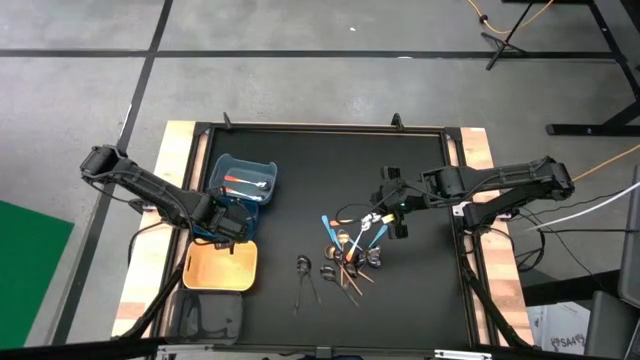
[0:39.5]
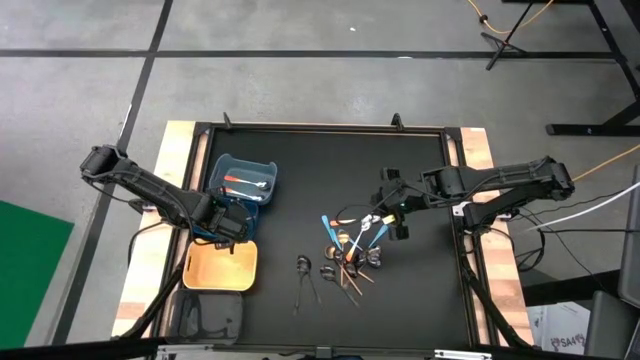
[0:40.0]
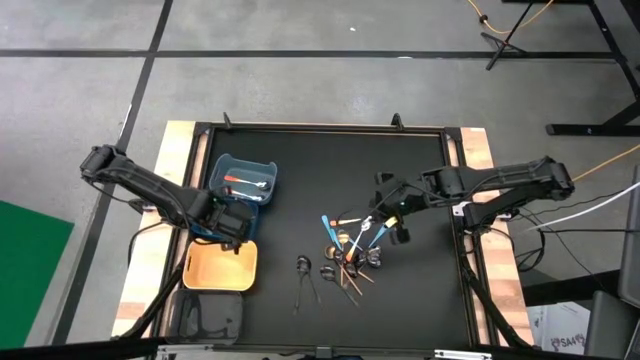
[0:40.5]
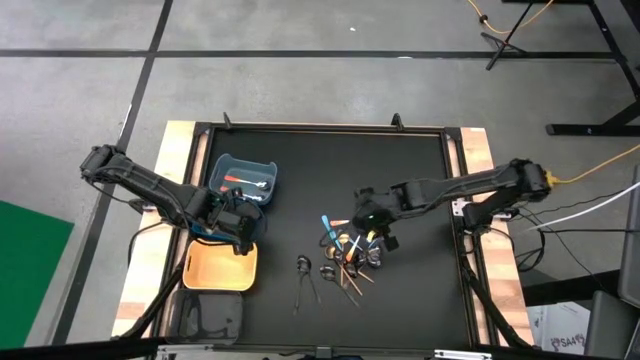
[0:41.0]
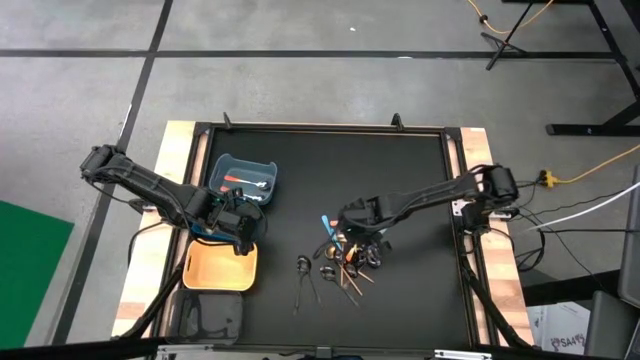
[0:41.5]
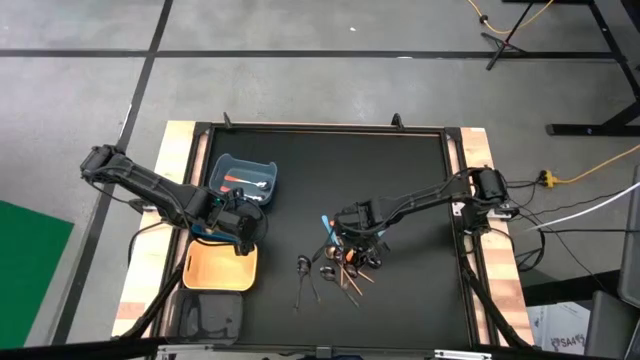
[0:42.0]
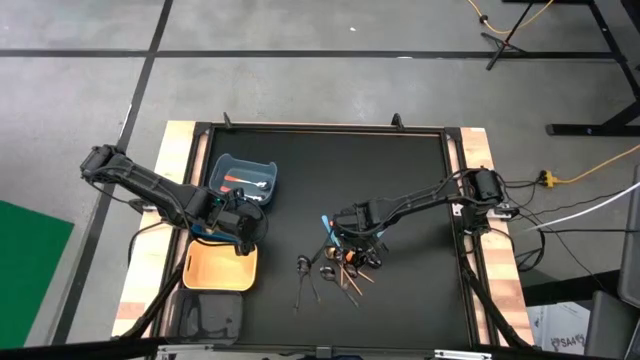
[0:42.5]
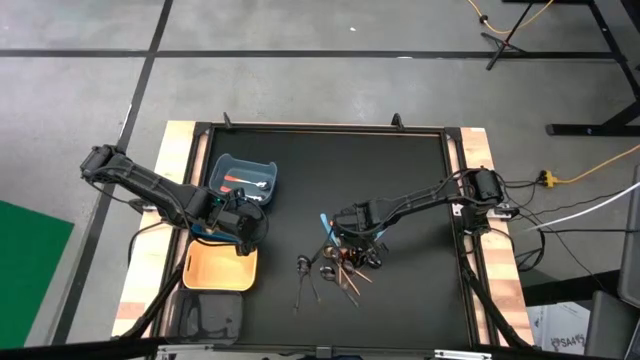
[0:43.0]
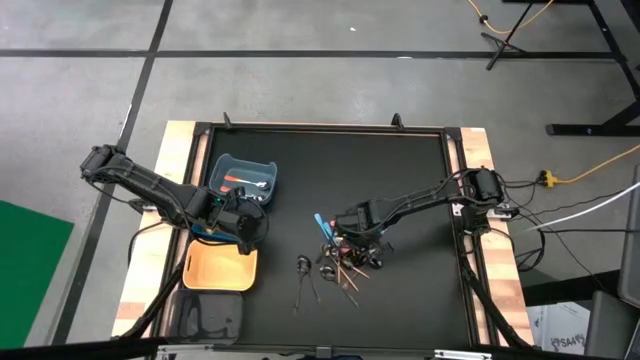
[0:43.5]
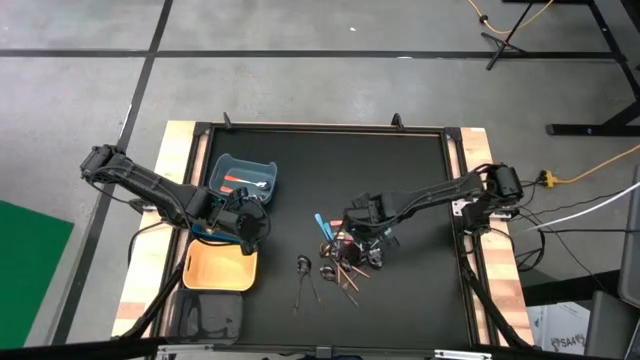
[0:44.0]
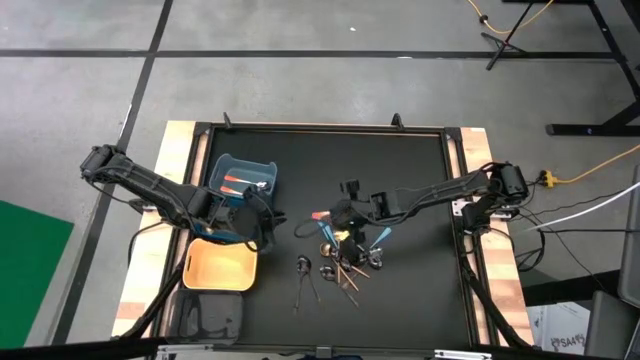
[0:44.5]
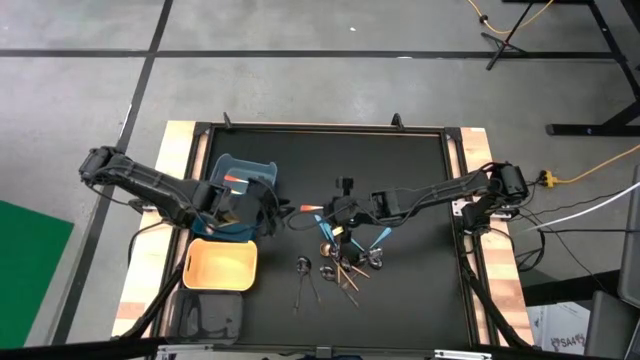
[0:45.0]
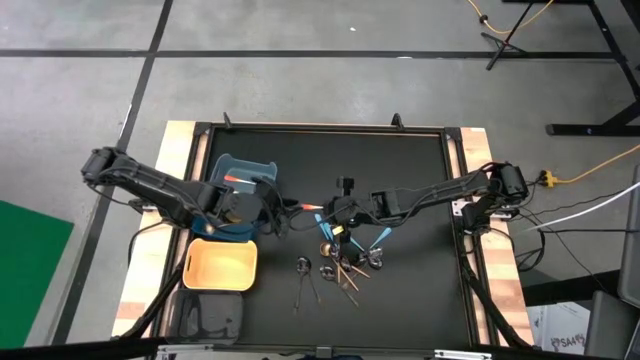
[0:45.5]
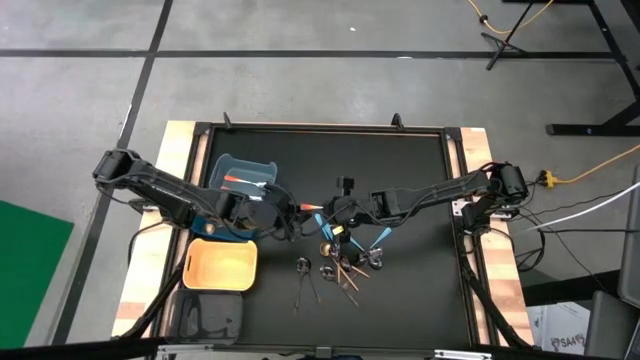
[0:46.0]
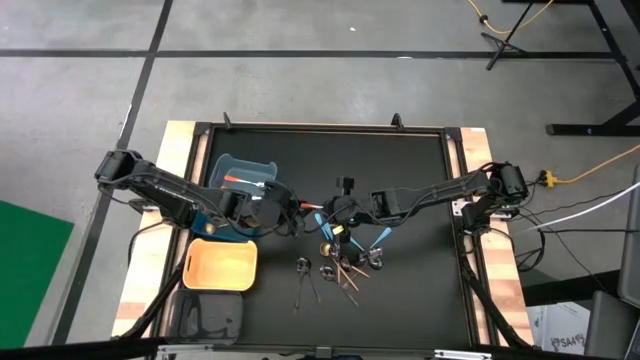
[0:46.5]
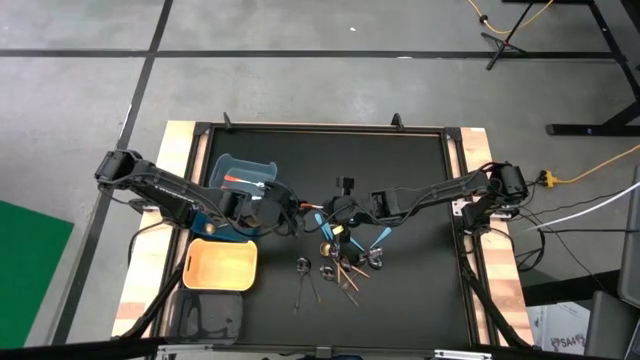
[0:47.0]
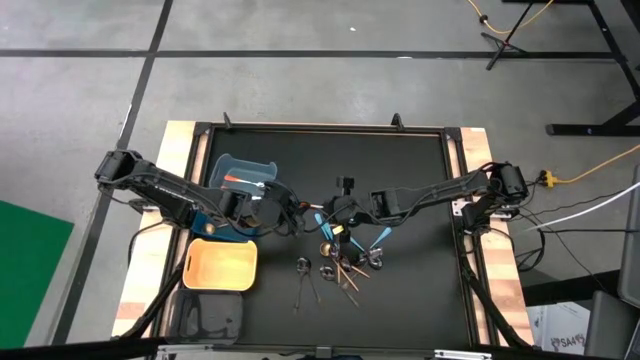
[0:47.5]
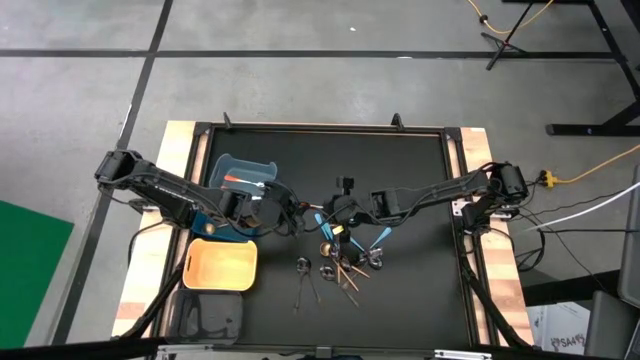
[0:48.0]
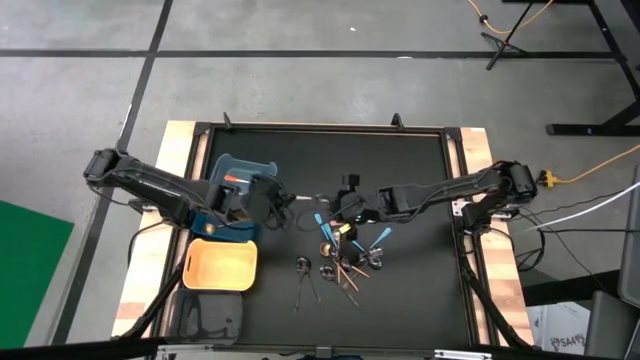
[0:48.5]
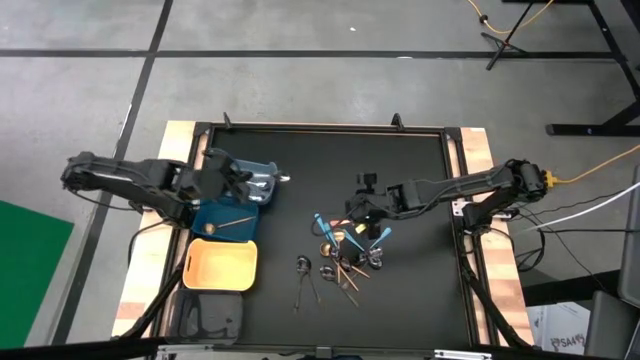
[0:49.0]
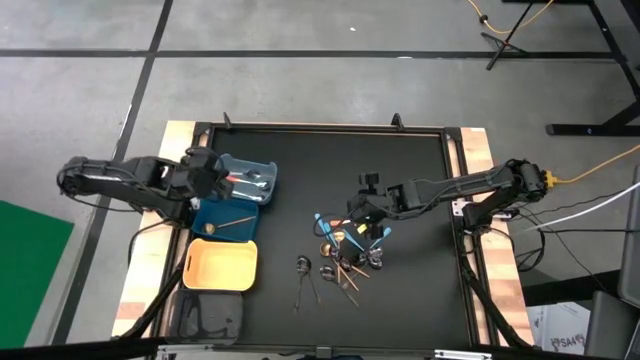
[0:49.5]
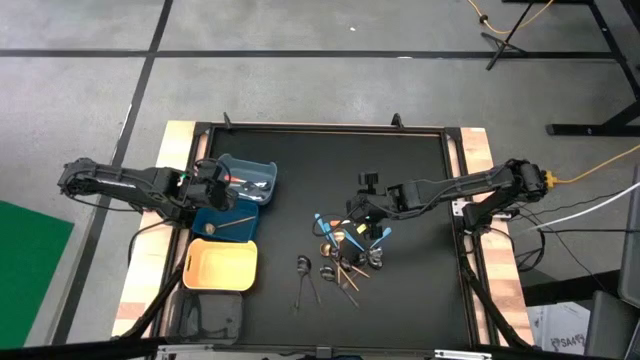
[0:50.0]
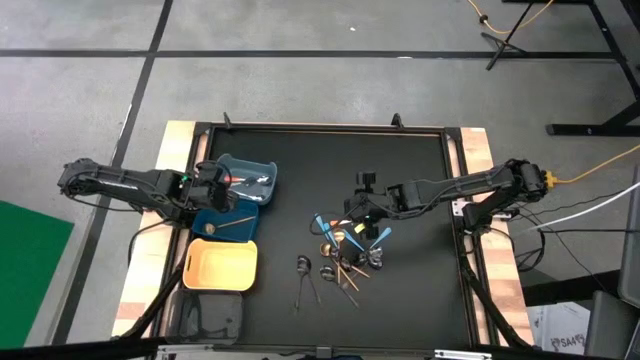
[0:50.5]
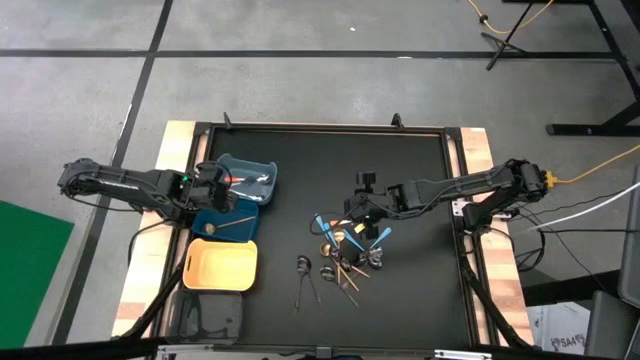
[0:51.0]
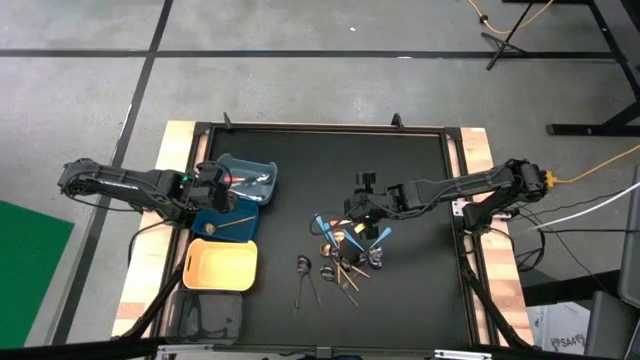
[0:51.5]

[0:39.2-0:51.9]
Task: Sort silverware by color (type)
Put the orange spoon into the light green bin

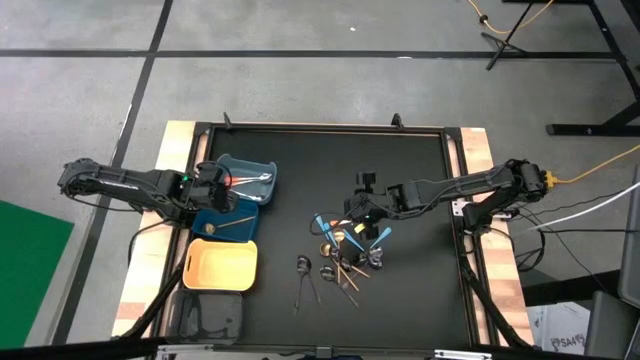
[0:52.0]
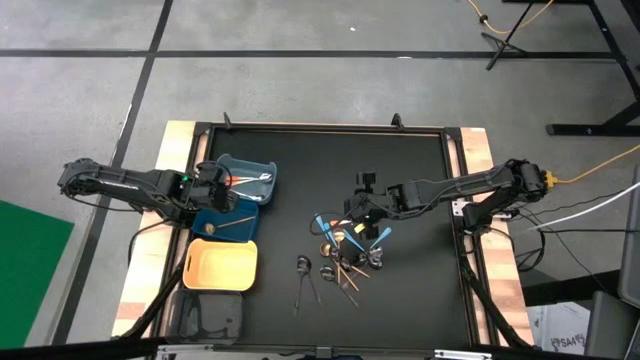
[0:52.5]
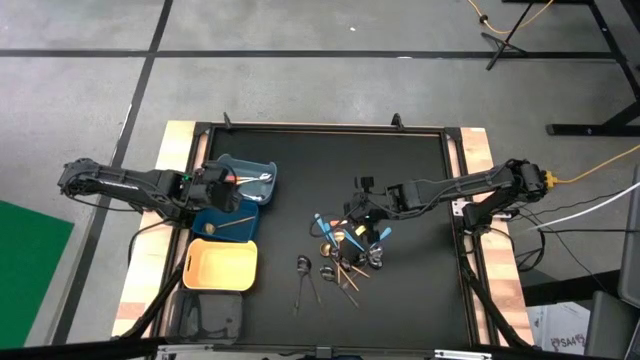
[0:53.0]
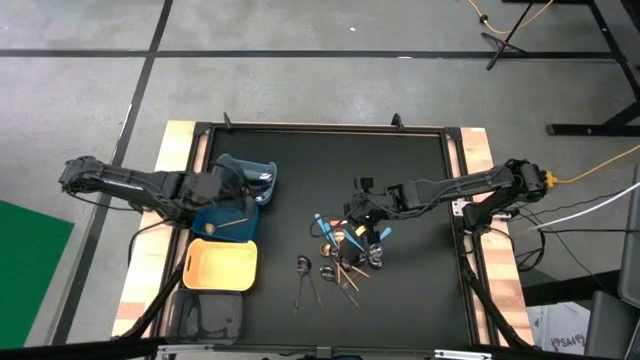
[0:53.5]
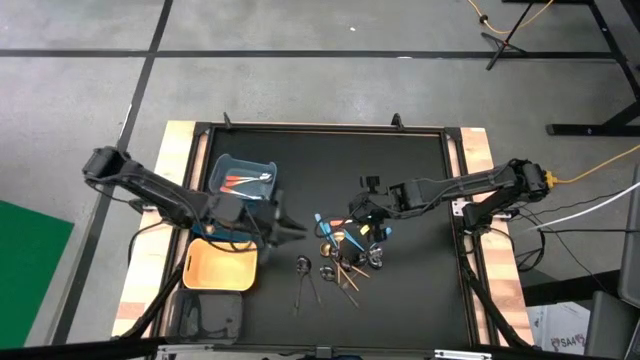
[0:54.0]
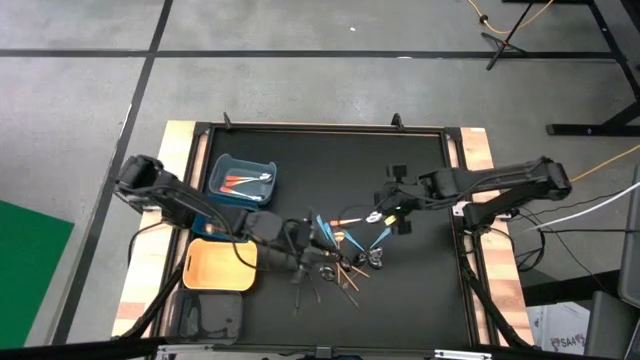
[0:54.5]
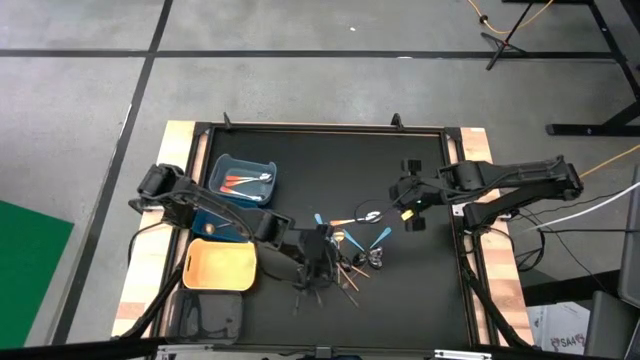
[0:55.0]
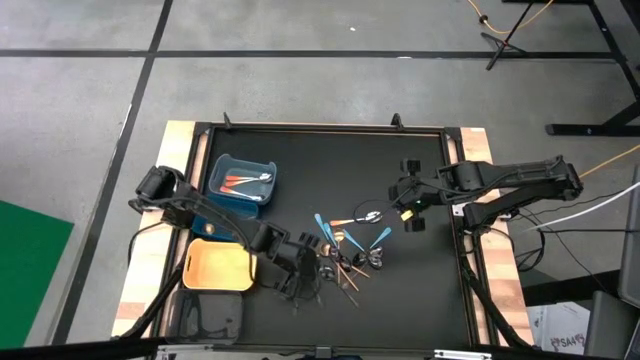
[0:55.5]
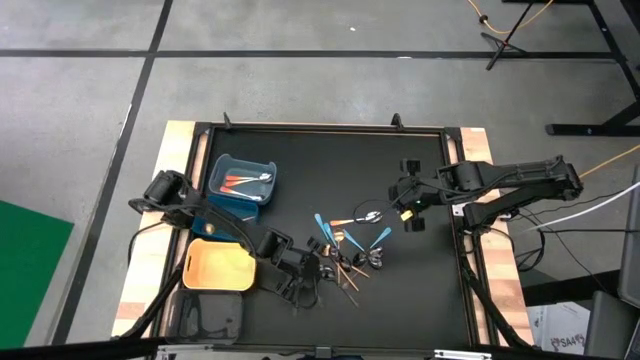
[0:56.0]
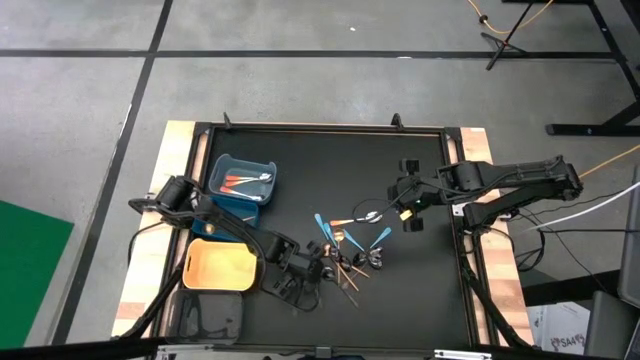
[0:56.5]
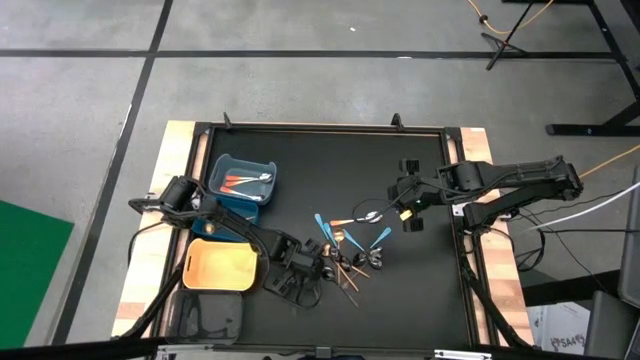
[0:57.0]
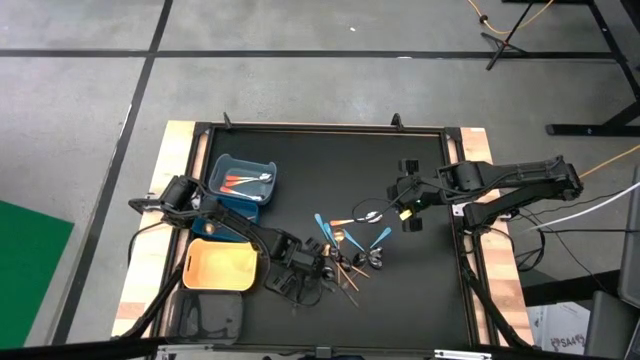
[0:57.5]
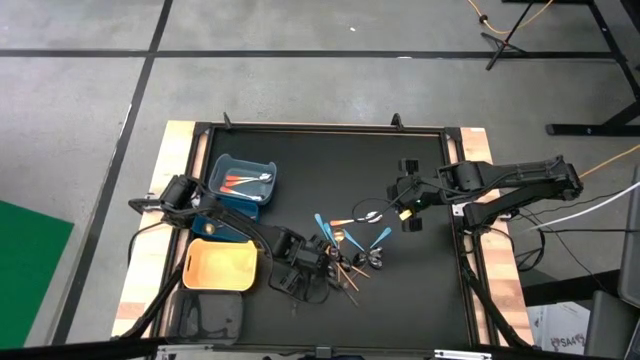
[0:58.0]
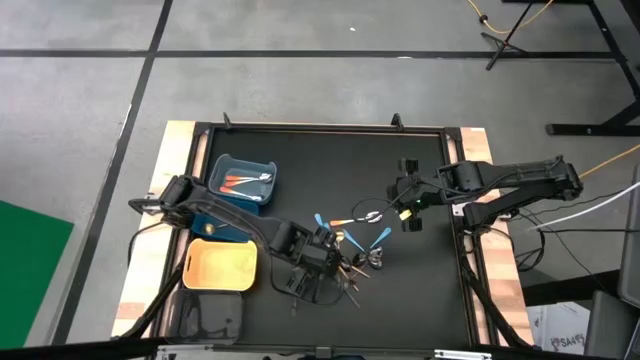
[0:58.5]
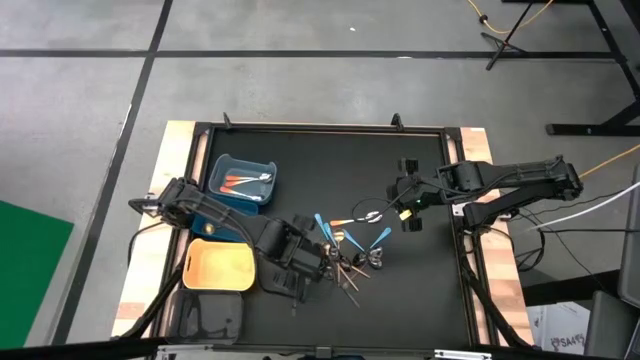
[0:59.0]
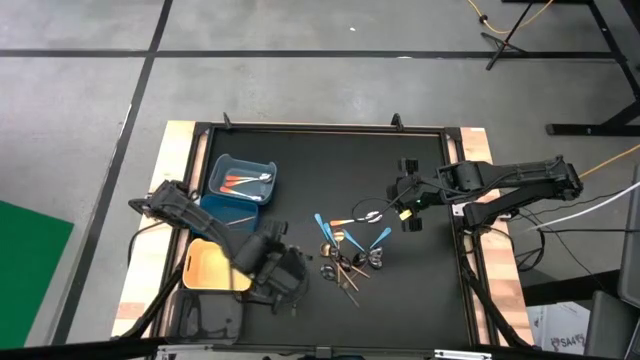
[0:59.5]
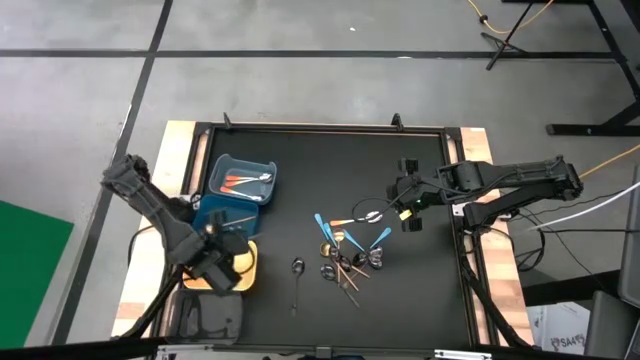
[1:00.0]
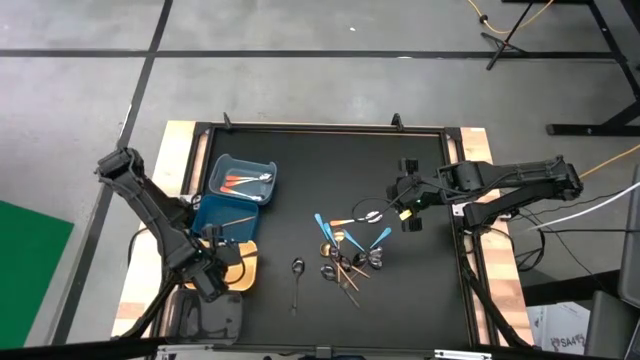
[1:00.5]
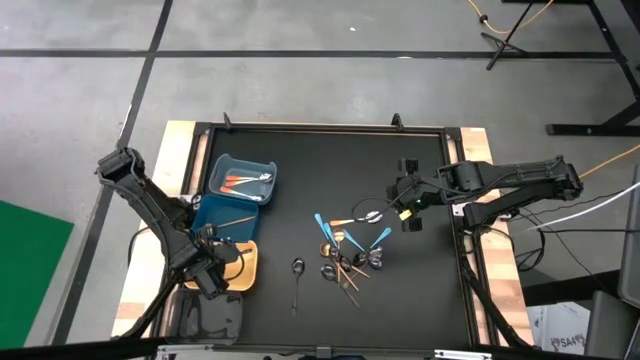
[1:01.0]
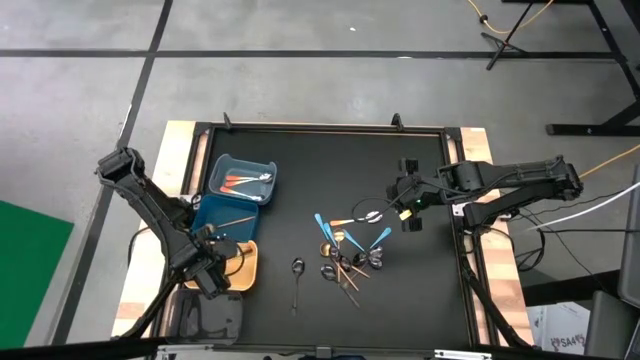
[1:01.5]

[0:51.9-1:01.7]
Put the black spoon into the orange bin
